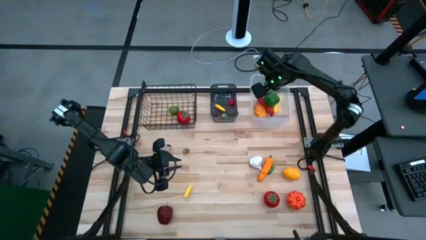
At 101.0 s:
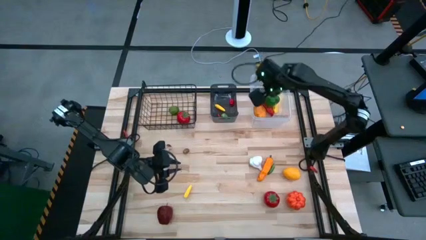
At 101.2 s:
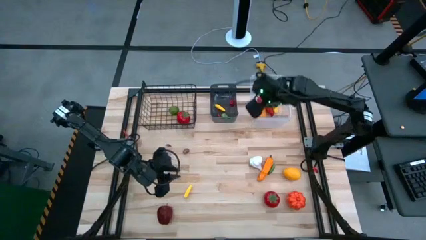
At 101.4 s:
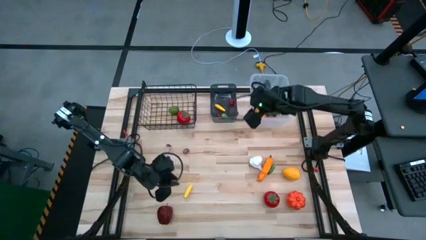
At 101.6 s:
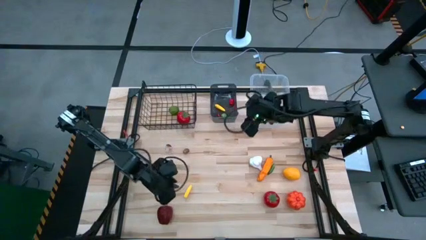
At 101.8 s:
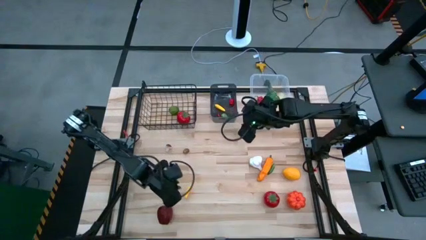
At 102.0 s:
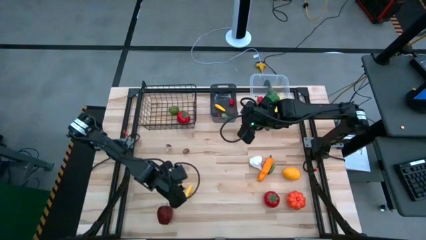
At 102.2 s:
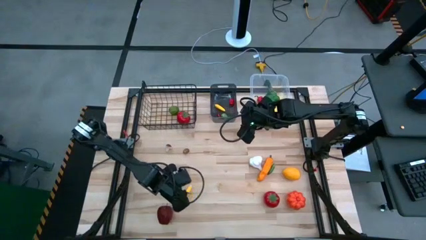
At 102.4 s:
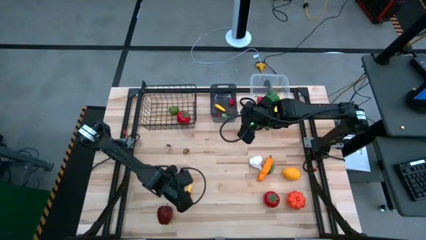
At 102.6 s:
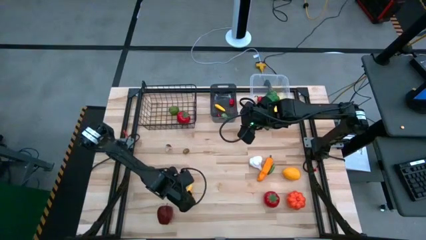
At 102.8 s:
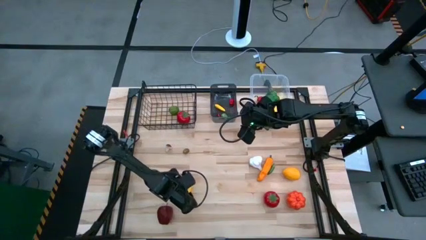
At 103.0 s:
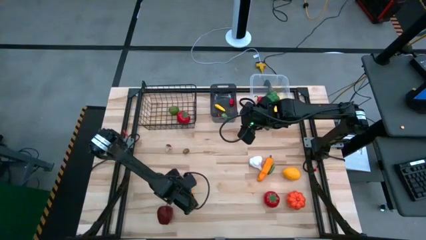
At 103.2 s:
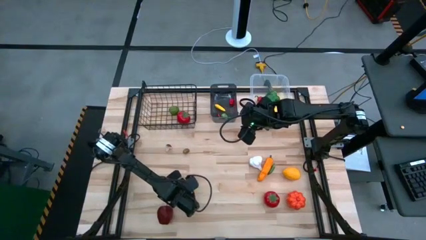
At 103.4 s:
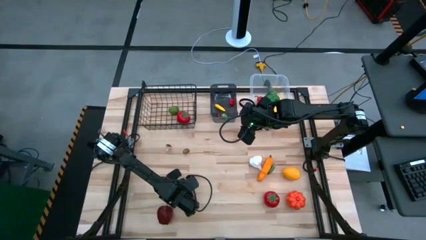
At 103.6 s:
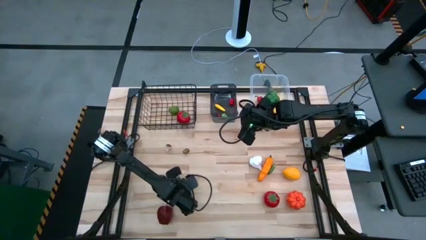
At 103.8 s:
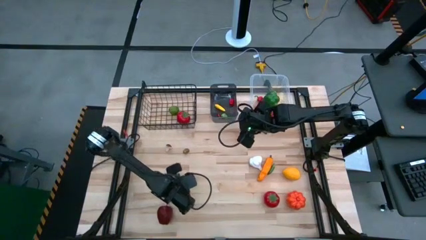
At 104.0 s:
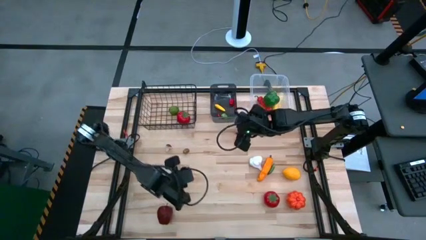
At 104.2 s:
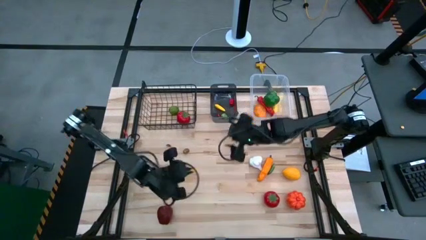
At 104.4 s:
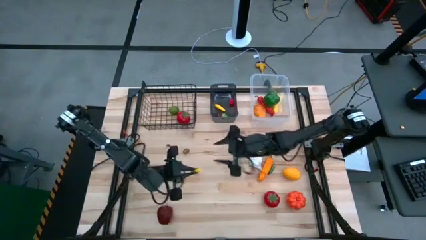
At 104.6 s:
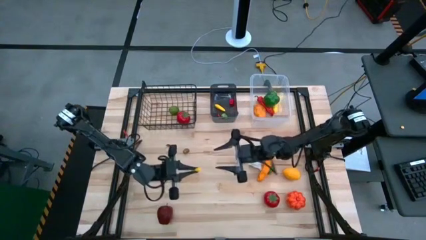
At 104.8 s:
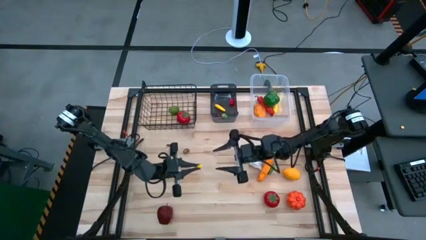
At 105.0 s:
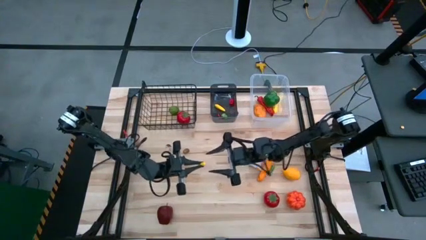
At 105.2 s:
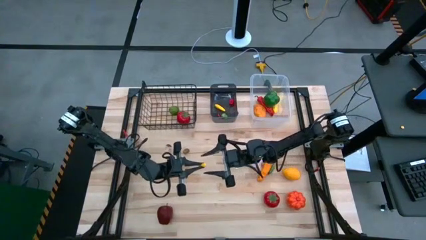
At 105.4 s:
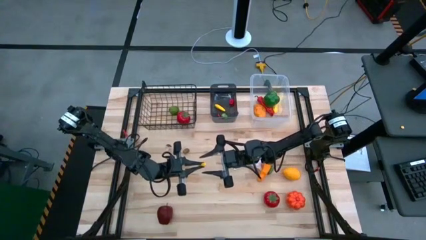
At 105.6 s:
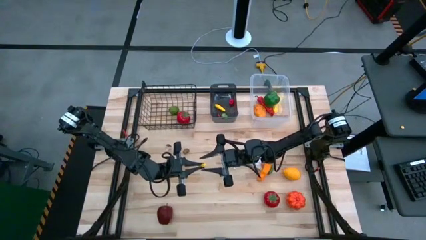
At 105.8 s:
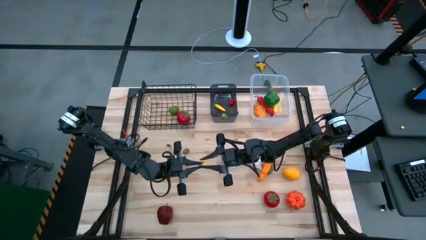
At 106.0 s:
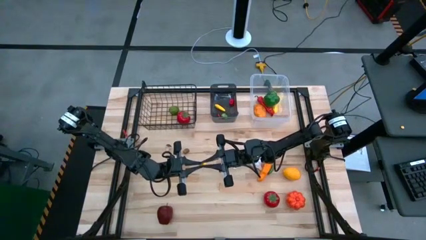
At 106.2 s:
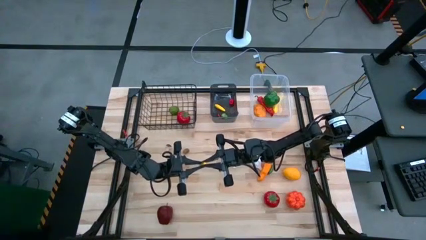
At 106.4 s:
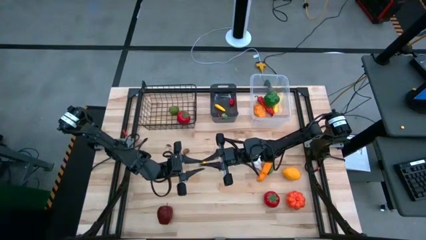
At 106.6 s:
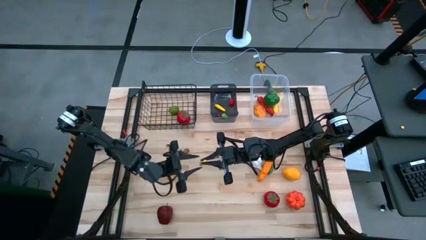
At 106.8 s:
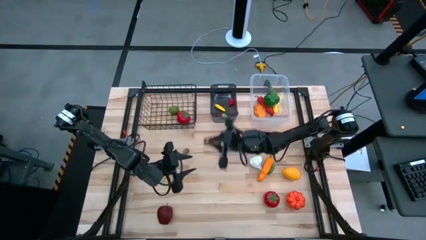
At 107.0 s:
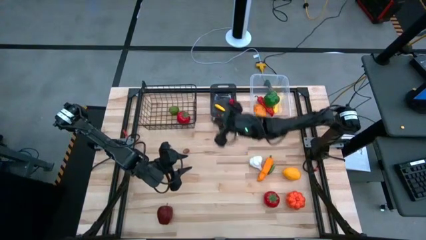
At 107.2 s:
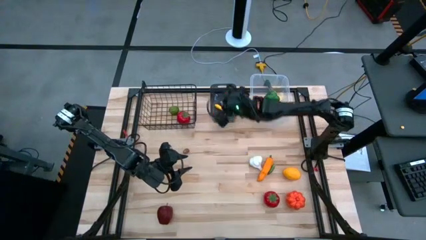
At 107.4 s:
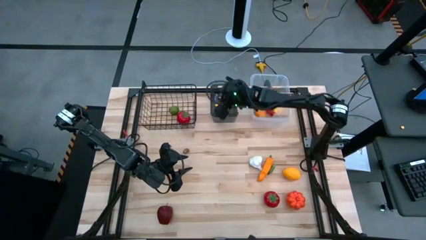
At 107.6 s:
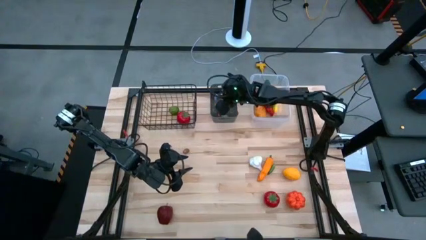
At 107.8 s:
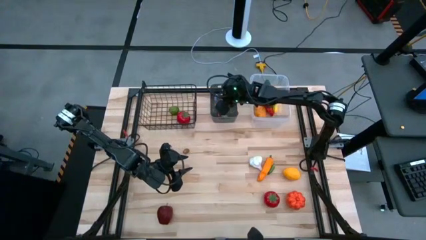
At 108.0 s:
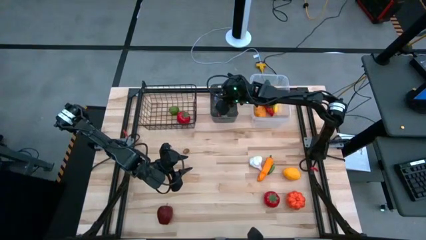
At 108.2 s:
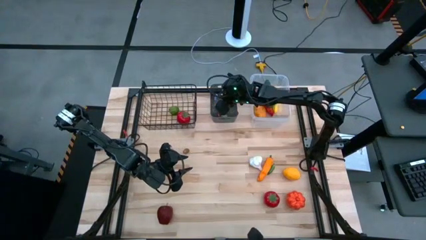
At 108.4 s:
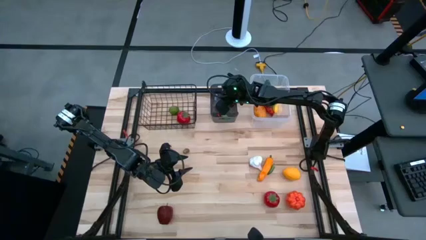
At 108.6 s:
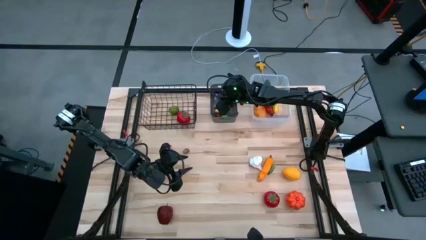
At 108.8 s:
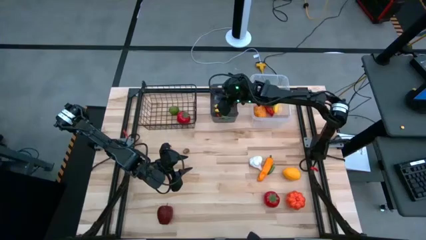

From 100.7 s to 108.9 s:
Task: Sort produce into baskets
Put the yellow chili pepper into the black bin

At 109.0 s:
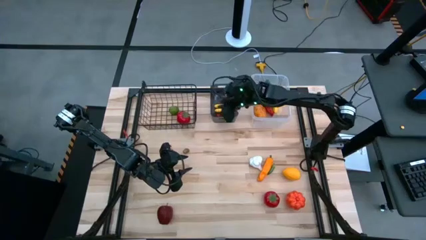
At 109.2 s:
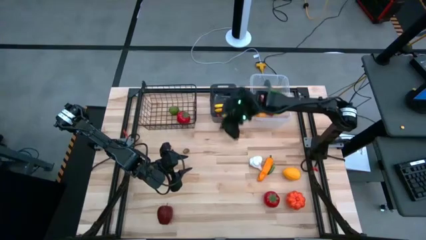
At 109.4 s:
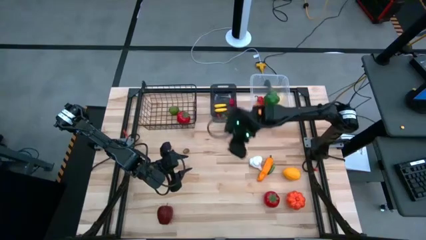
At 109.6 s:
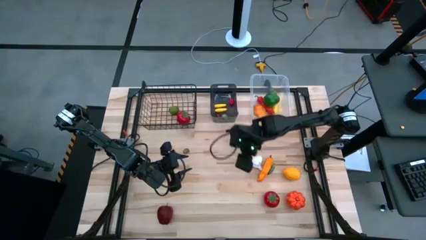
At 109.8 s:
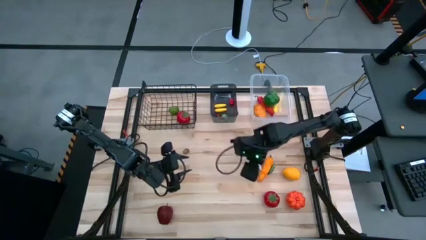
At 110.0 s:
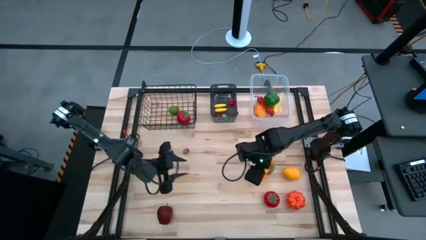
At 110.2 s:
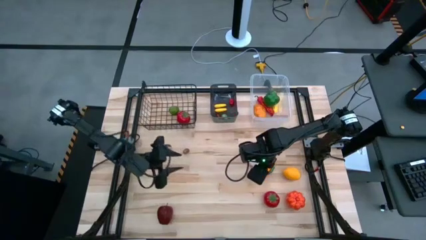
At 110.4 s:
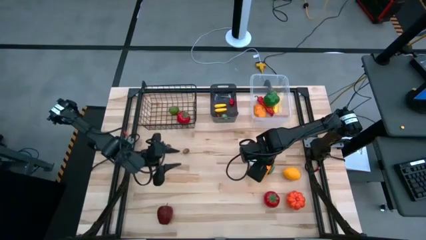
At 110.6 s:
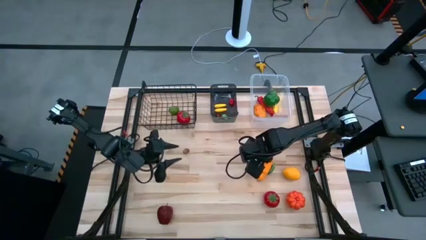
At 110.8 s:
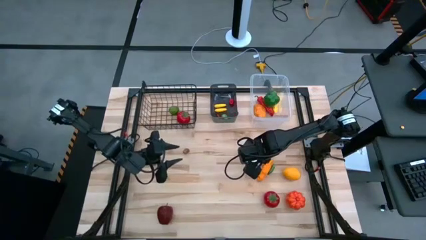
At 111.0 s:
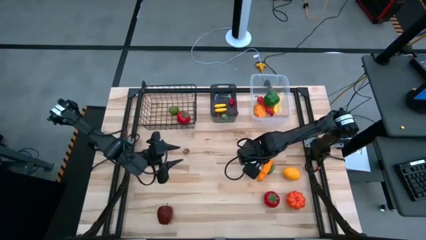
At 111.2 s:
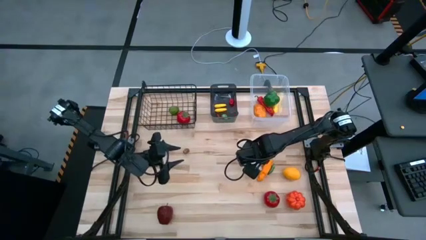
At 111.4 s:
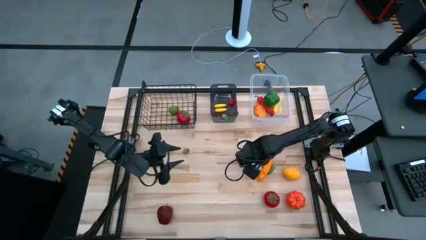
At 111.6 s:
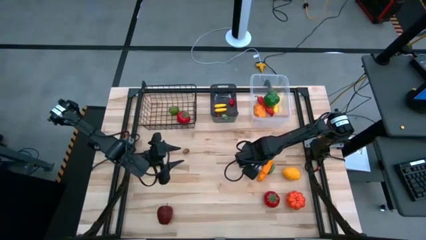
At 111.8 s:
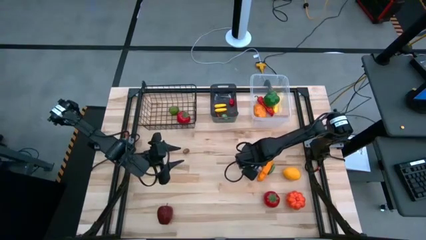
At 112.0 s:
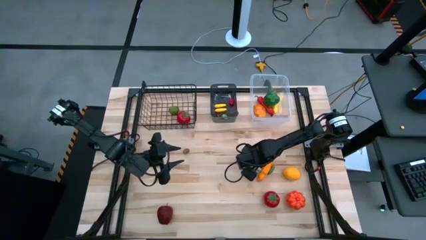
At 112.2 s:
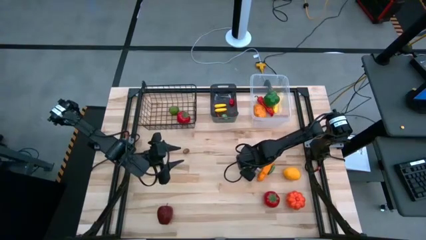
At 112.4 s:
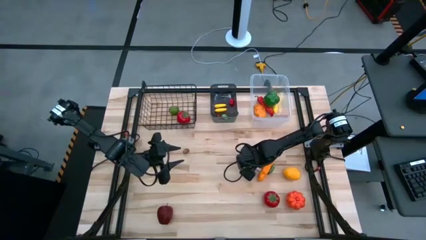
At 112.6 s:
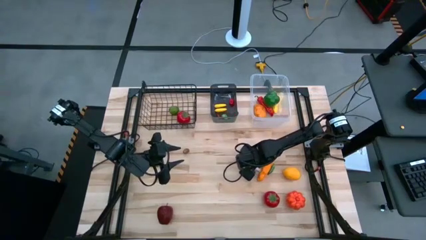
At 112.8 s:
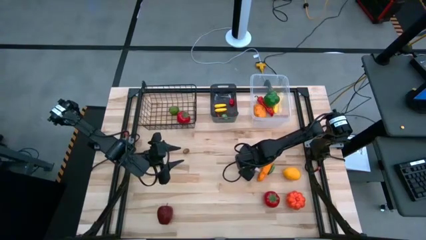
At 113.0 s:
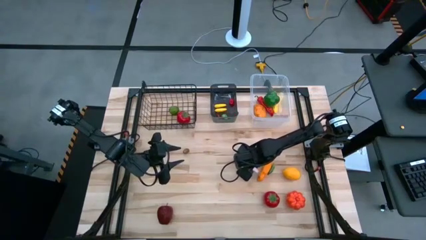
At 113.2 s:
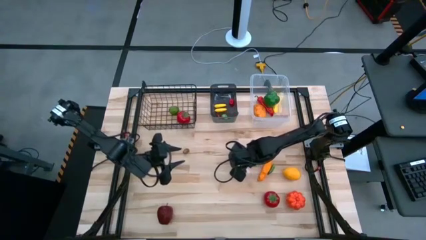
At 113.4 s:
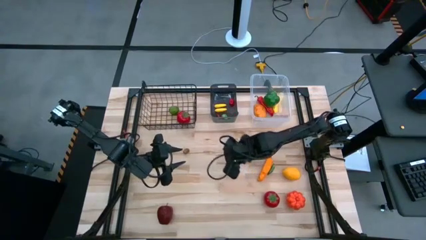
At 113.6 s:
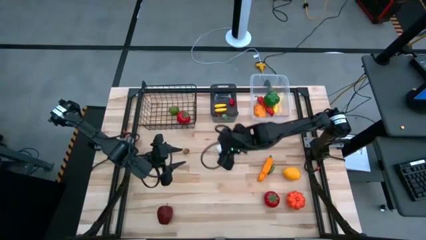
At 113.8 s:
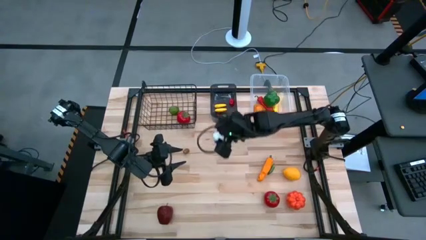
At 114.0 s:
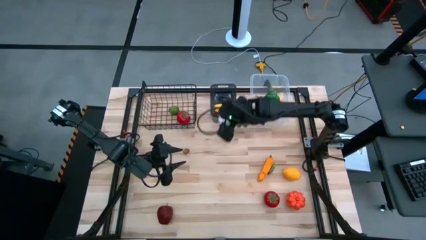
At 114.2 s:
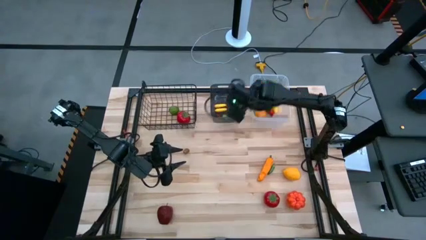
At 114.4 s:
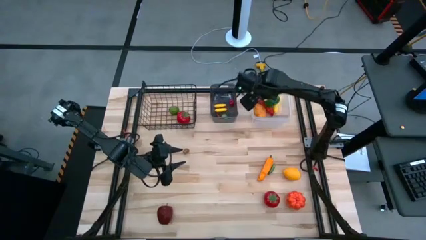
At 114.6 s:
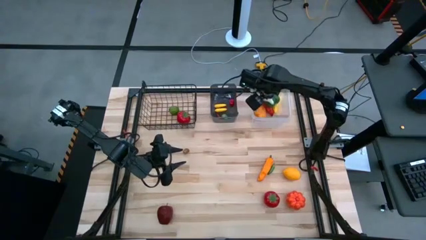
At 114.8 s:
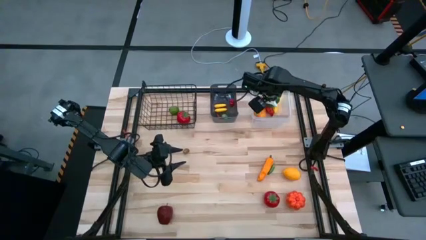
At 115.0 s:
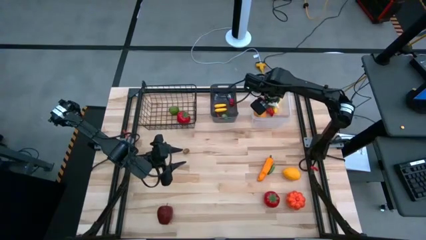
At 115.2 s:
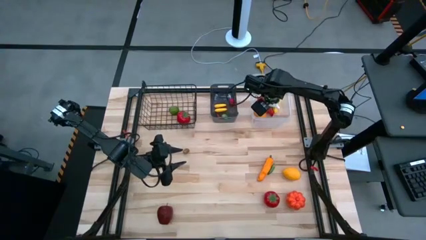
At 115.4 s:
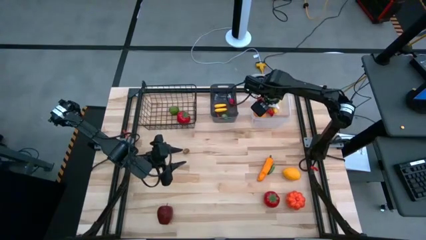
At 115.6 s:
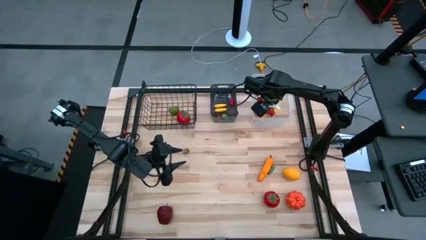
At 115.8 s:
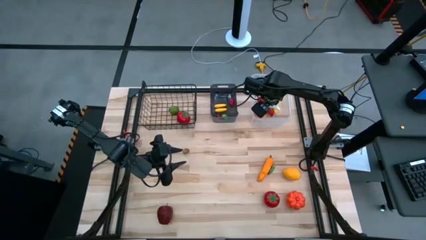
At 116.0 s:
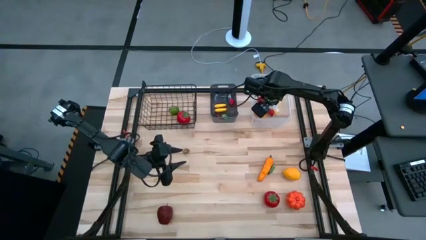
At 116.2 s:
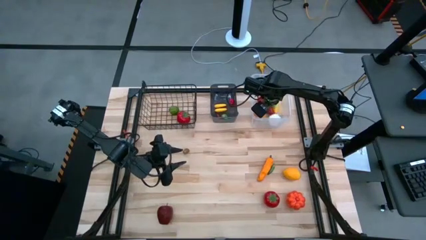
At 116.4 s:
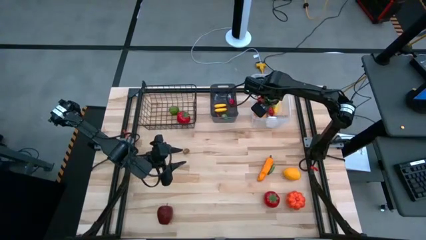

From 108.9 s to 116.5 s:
Put the garlic into the transparent bin
